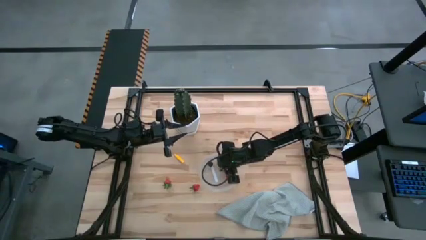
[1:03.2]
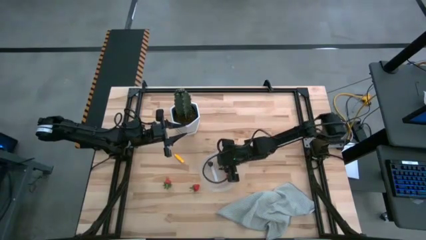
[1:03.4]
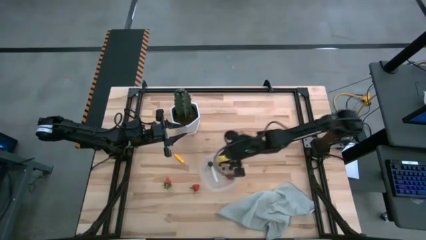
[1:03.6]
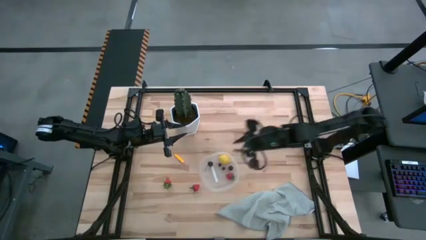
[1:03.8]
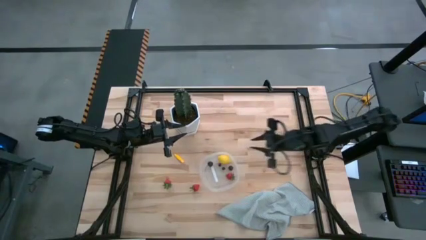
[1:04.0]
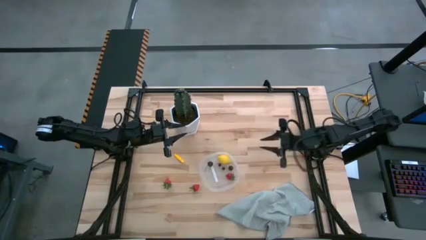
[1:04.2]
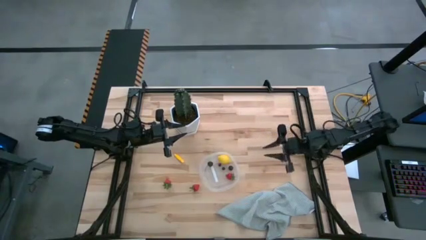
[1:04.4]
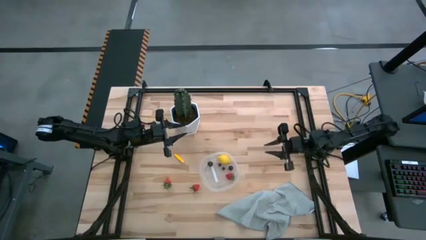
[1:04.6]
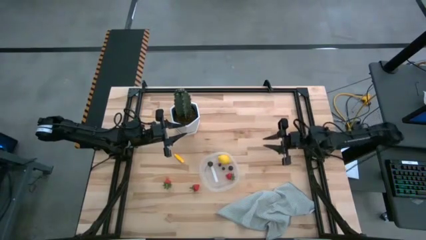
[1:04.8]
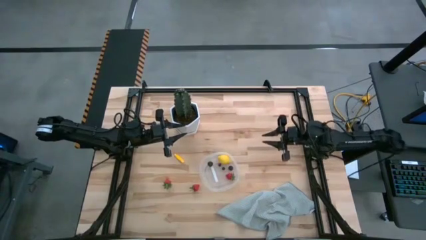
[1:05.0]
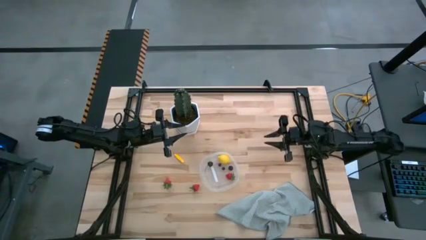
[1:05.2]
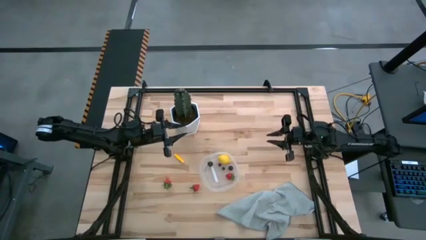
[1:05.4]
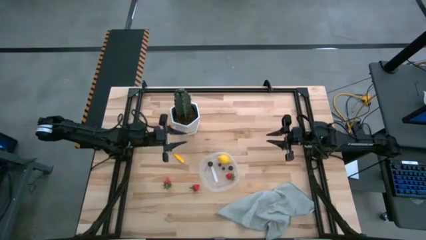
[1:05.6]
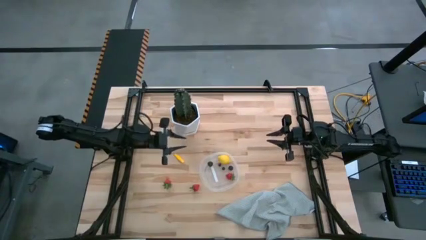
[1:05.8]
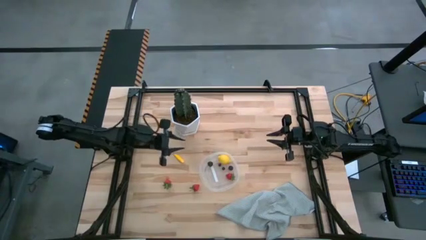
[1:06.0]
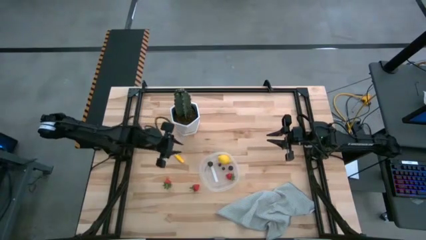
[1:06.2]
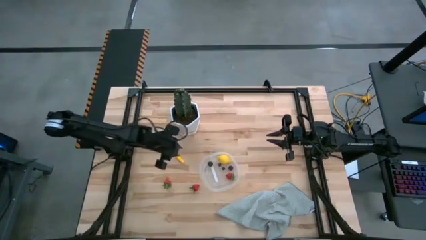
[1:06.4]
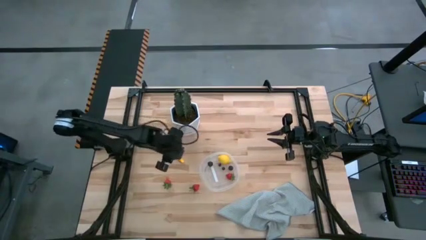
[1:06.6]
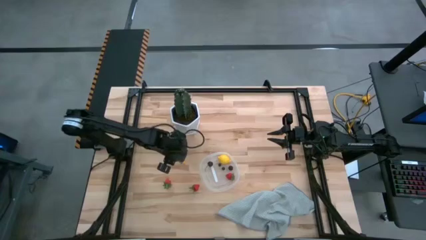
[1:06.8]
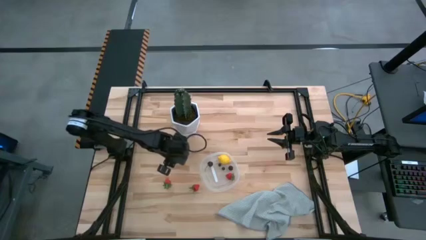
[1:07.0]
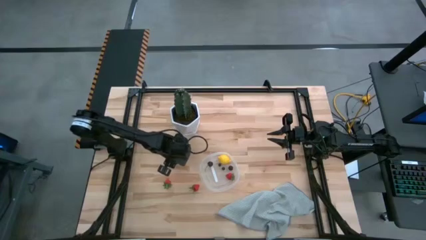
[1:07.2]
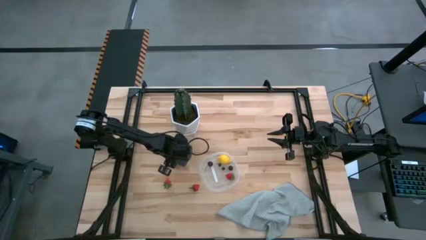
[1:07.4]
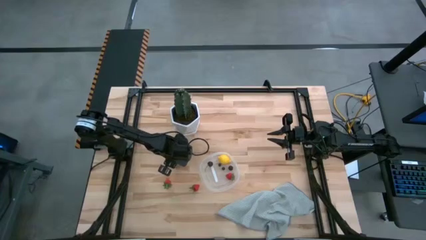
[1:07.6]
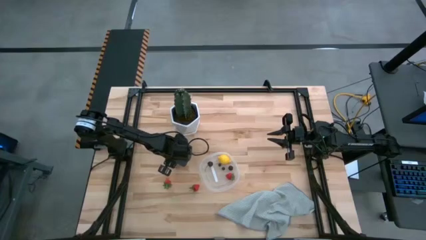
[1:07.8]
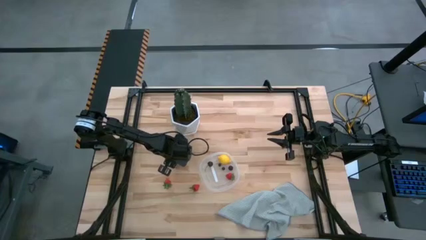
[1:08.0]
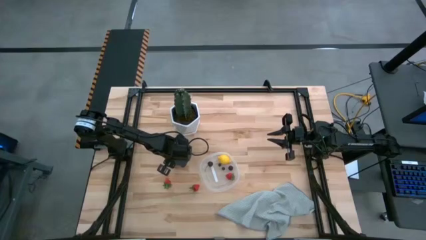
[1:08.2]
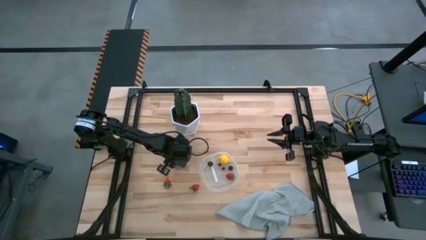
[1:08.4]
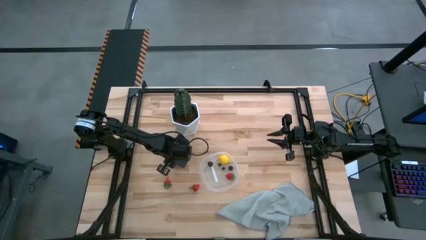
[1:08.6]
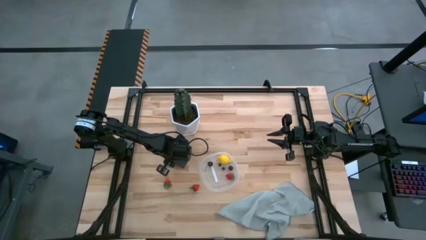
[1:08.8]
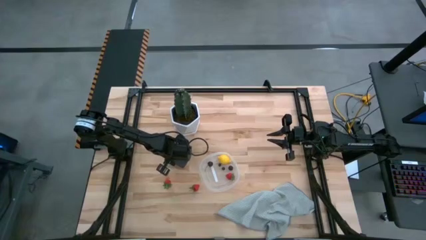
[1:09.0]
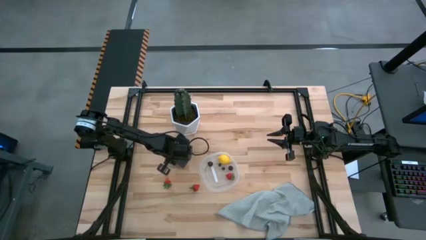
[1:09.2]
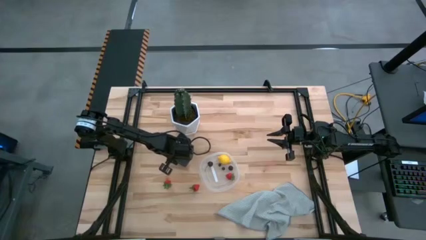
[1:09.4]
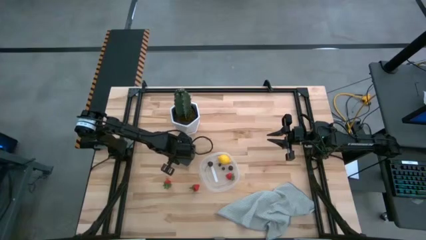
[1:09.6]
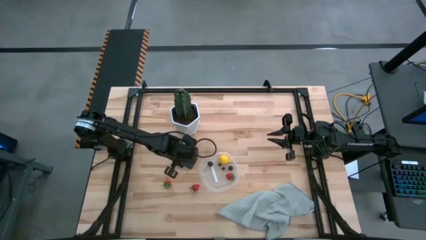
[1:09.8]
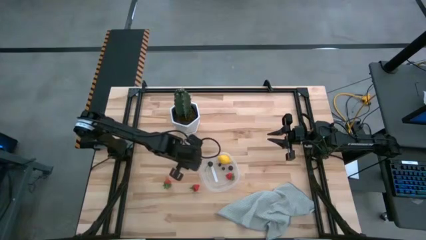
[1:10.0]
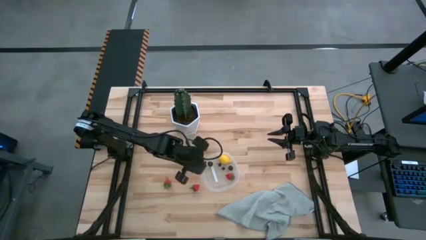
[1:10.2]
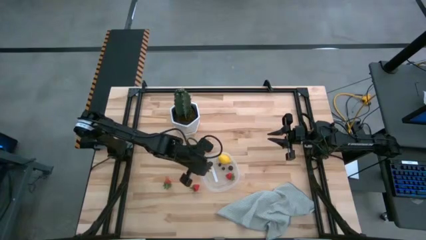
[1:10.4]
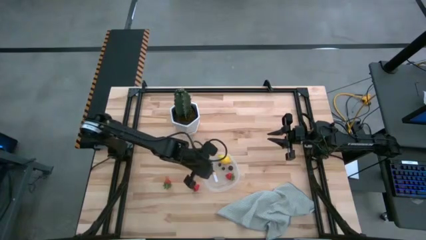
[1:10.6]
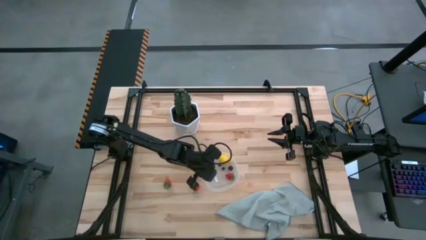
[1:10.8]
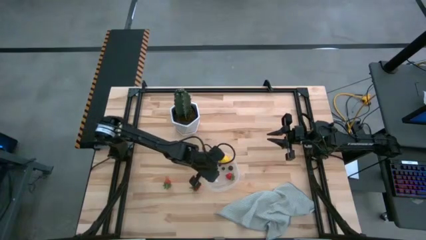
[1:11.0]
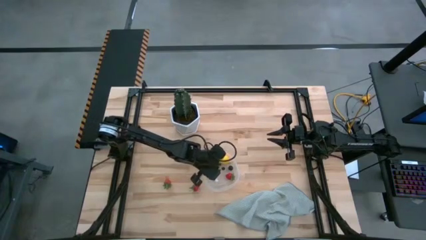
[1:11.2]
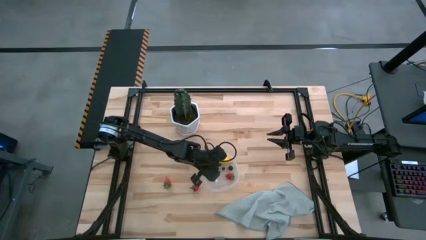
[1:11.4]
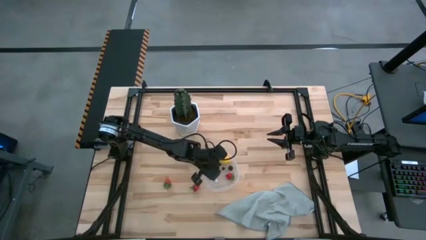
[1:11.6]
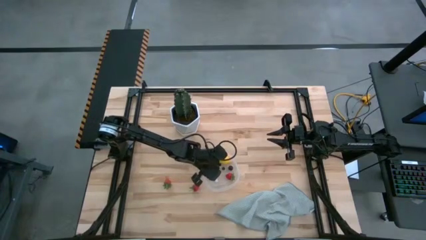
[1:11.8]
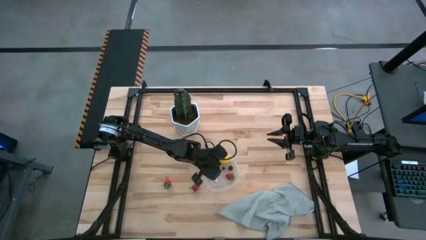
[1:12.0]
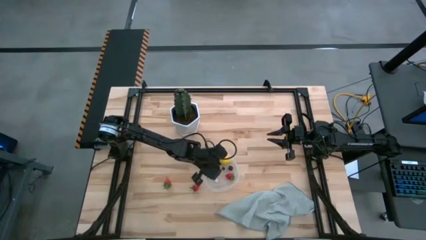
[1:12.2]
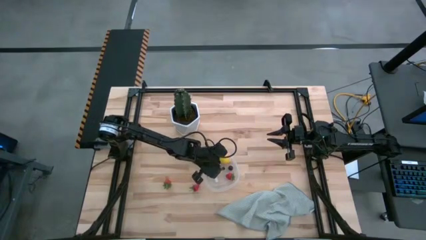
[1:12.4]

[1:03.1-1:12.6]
Task: Pick and placing Produce into tupperware
Put the yellow corn into the transparent container

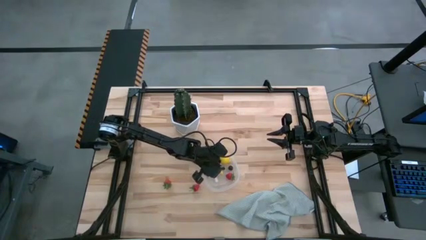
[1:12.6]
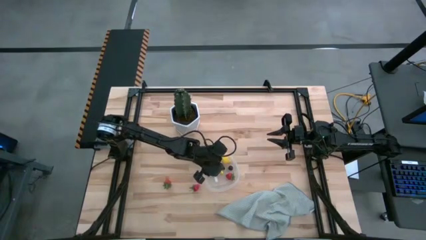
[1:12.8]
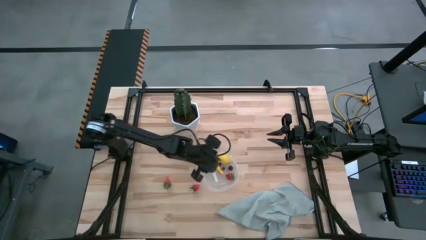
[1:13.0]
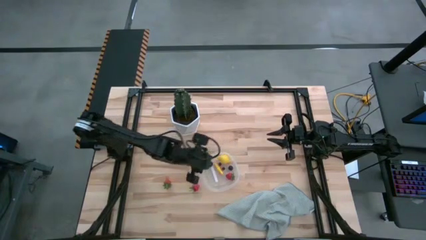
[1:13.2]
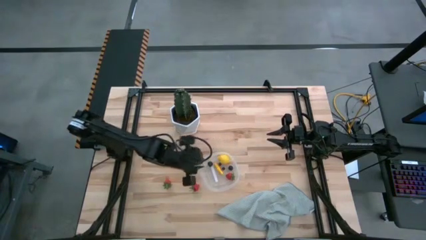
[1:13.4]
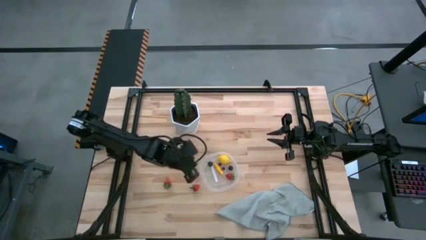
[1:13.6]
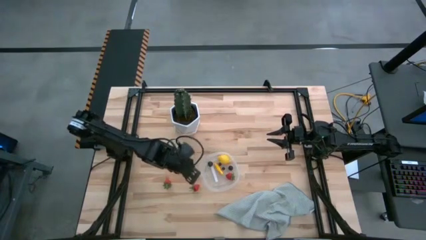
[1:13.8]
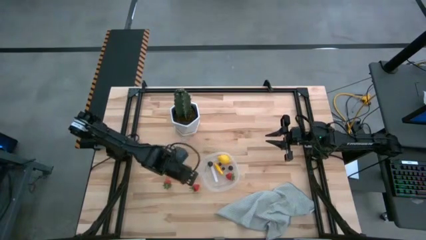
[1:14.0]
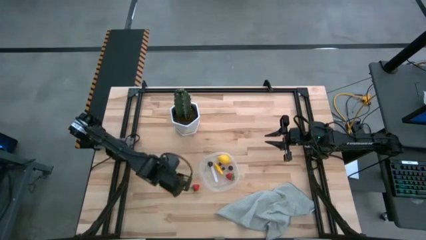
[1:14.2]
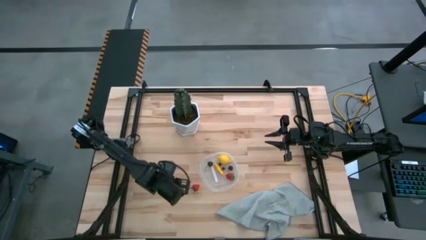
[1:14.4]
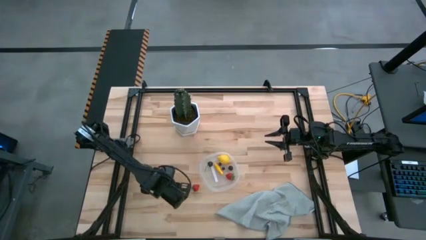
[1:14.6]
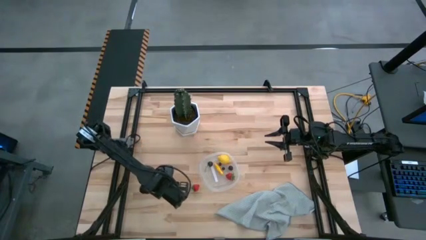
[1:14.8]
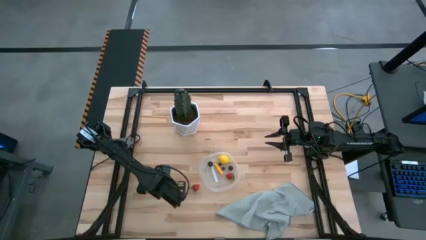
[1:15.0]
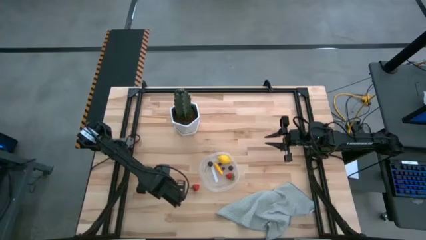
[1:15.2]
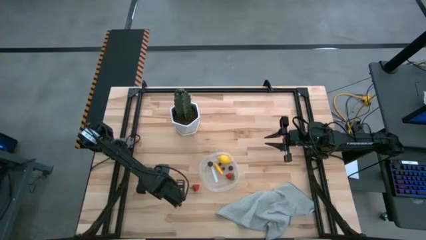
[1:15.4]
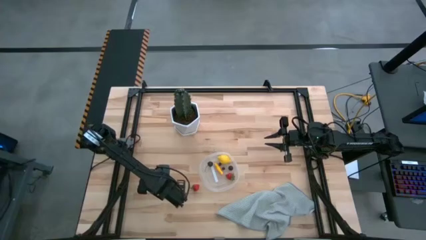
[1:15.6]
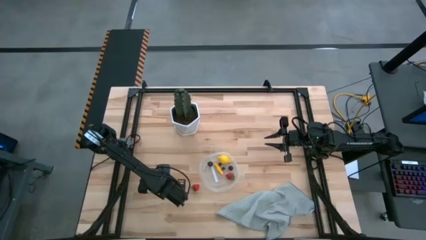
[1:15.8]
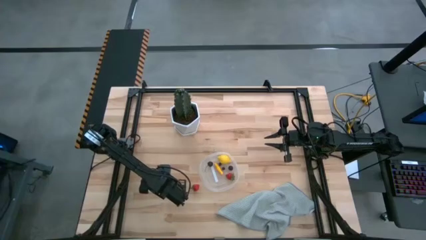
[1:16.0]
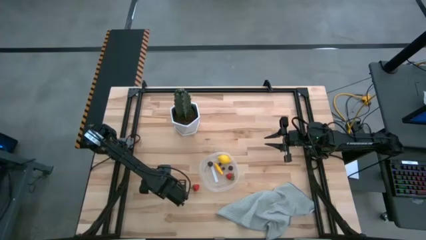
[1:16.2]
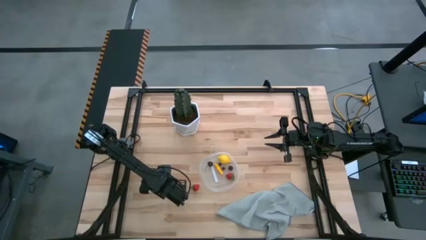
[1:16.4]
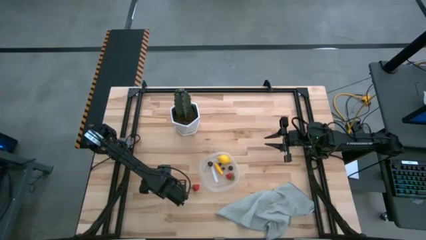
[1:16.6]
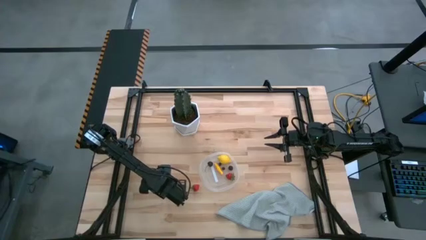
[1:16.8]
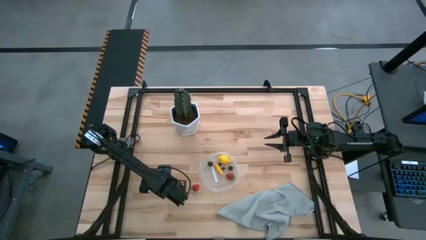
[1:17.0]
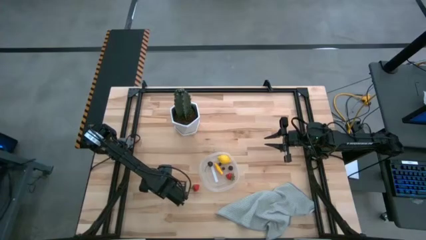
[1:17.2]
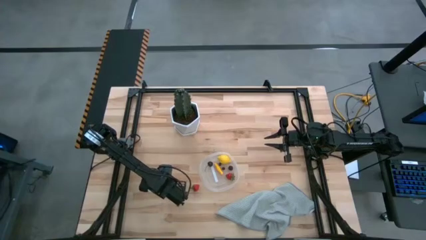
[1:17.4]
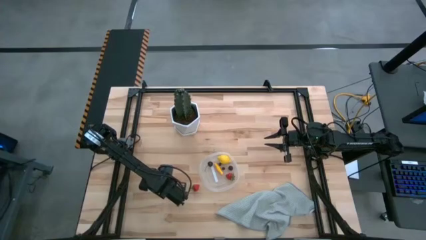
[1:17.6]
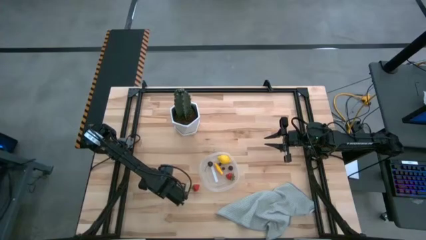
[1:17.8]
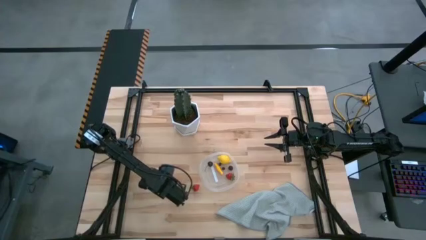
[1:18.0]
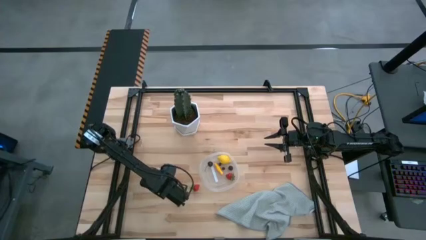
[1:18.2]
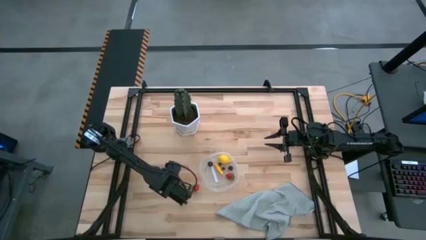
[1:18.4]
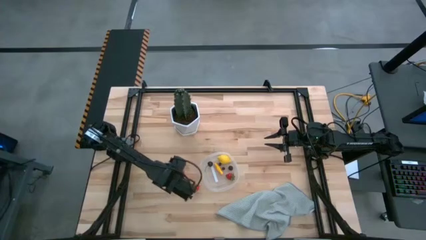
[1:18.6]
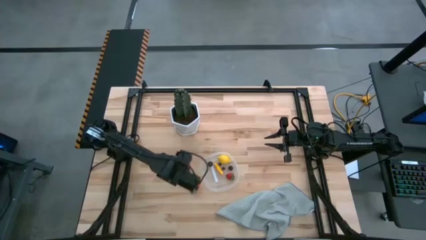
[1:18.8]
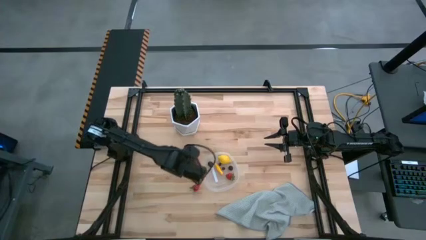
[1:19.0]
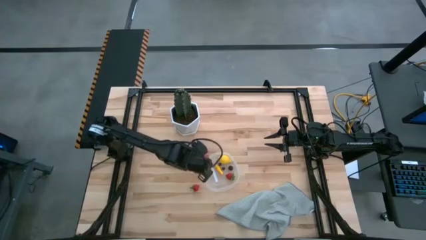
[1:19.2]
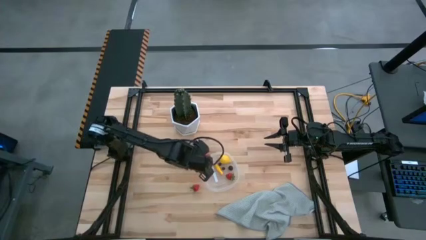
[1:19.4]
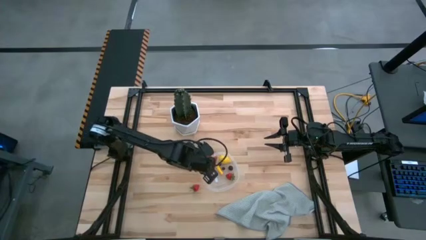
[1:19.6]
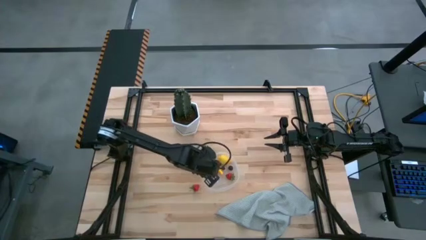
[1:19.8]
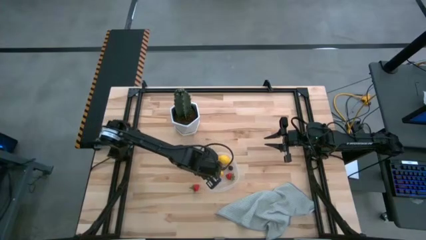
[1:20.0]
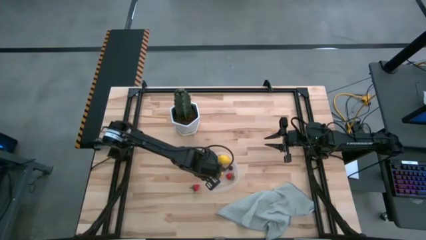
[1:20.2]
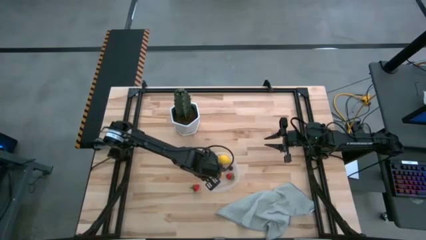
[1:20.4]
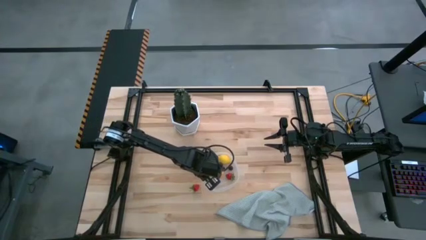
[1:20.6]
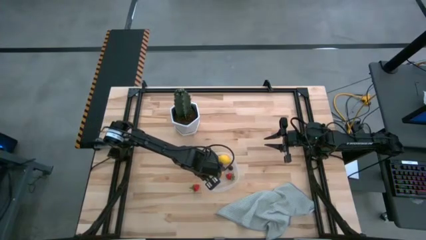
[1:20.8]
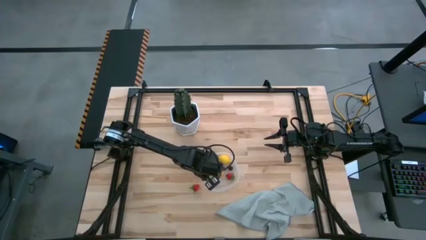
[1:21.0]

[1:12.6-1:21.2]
Put the left red strawberry into the transparent container
